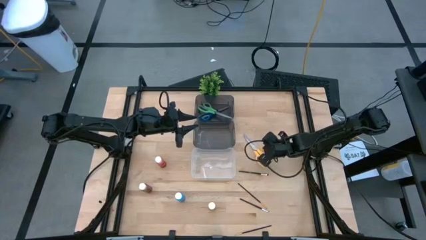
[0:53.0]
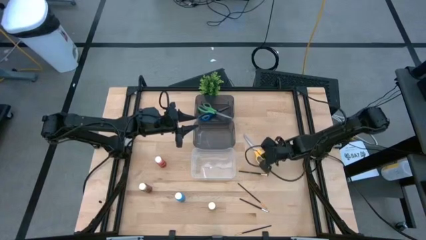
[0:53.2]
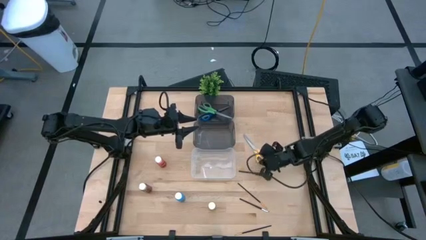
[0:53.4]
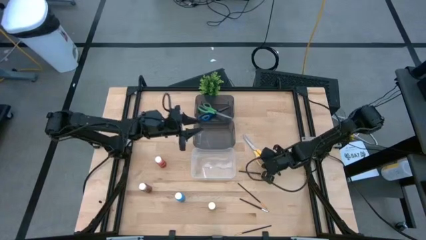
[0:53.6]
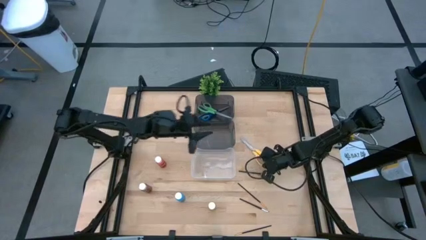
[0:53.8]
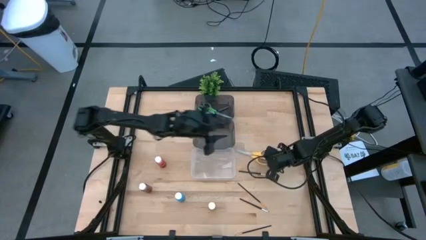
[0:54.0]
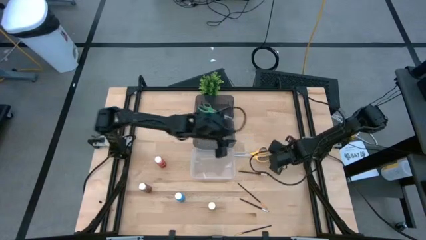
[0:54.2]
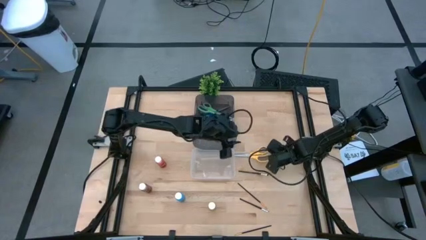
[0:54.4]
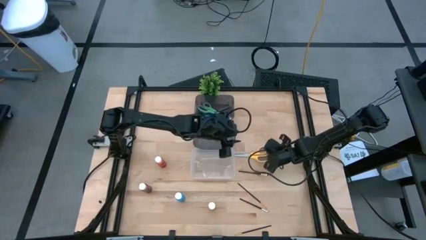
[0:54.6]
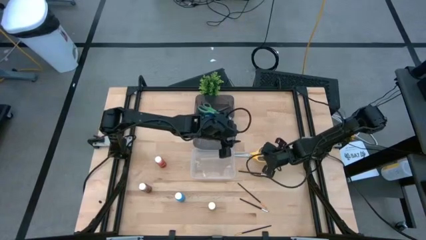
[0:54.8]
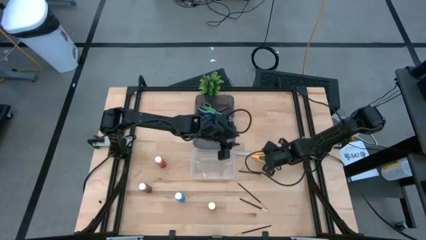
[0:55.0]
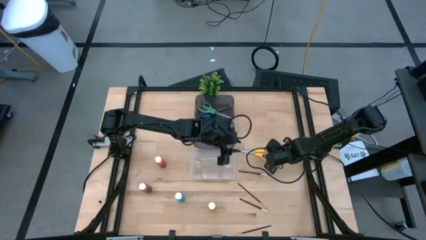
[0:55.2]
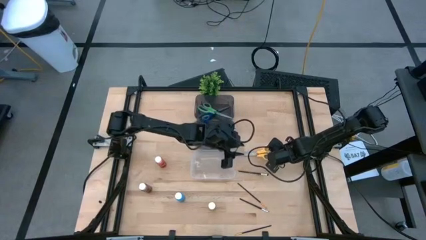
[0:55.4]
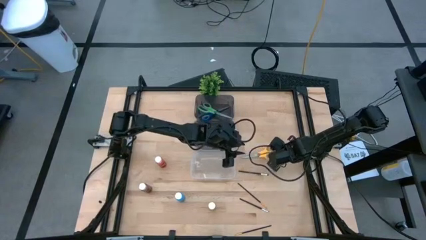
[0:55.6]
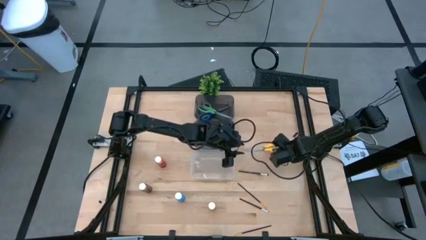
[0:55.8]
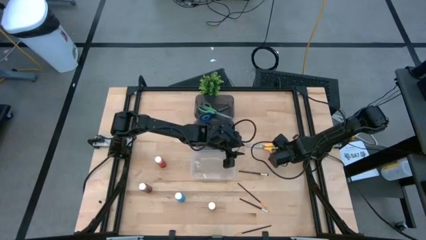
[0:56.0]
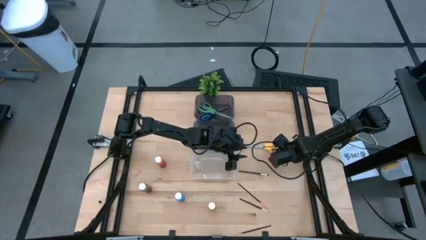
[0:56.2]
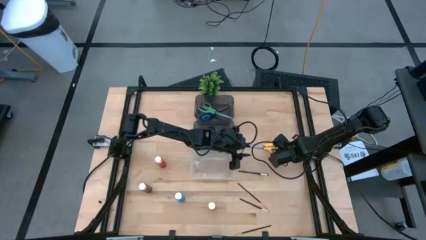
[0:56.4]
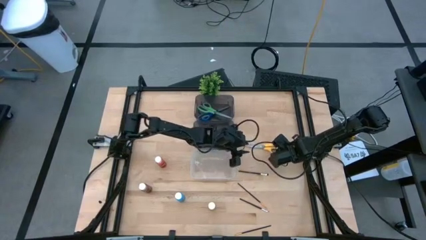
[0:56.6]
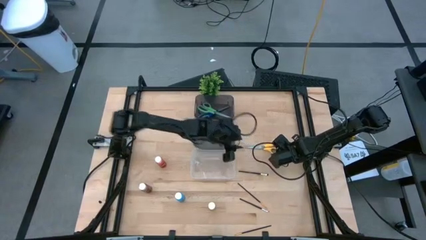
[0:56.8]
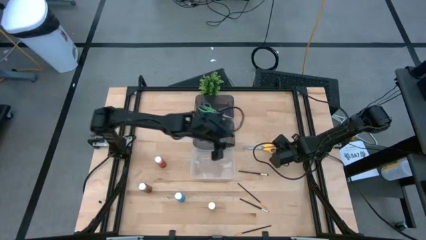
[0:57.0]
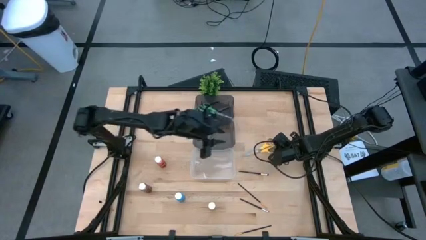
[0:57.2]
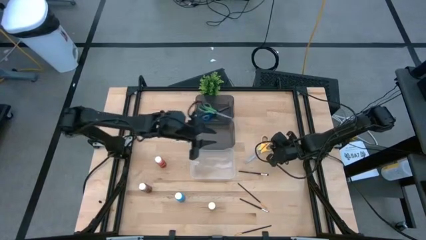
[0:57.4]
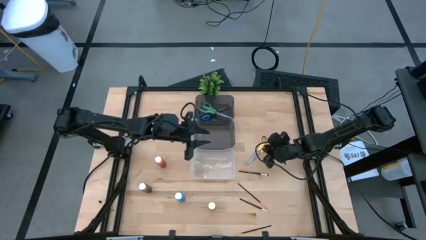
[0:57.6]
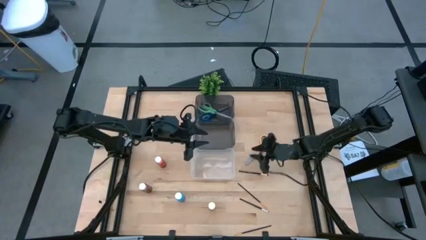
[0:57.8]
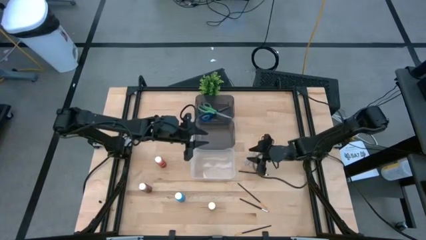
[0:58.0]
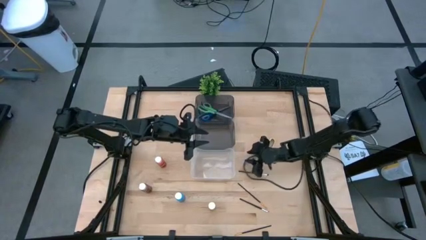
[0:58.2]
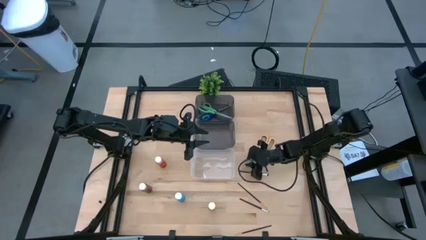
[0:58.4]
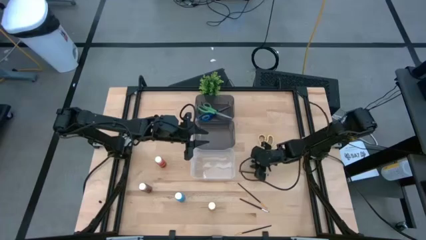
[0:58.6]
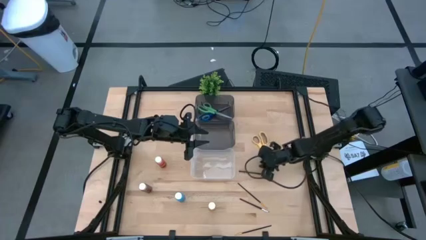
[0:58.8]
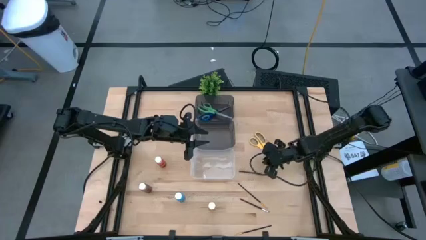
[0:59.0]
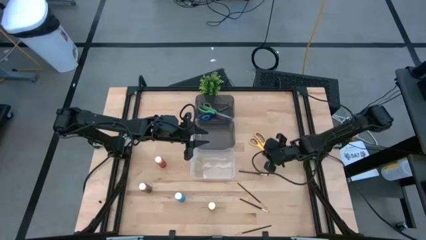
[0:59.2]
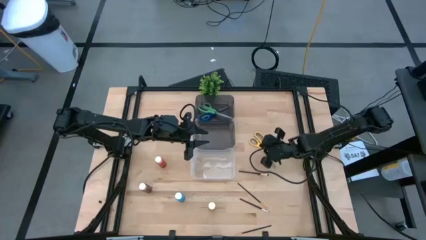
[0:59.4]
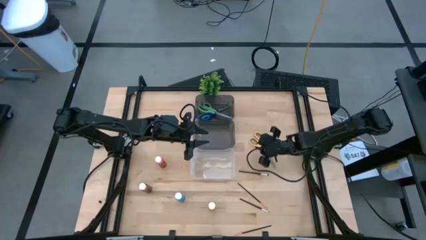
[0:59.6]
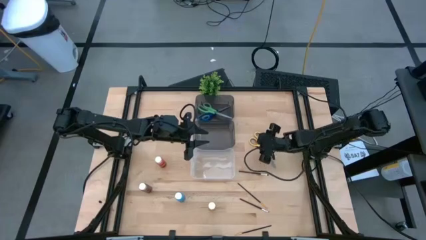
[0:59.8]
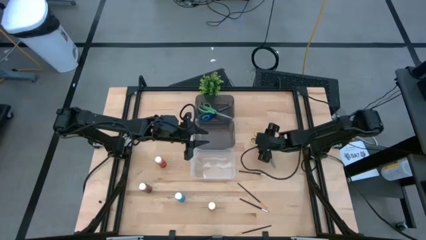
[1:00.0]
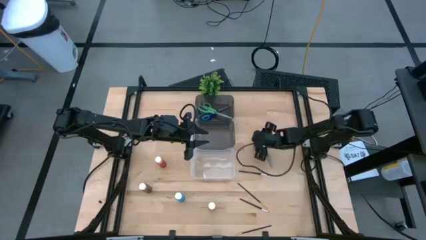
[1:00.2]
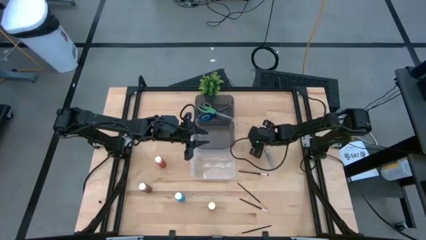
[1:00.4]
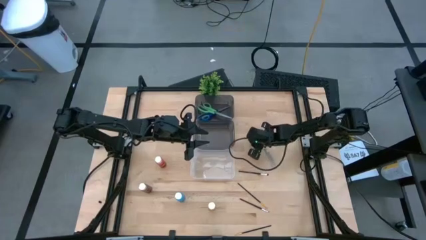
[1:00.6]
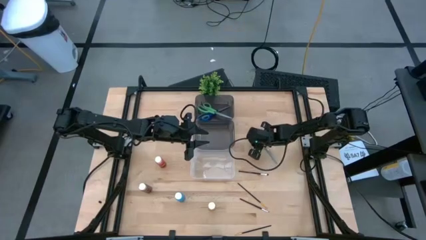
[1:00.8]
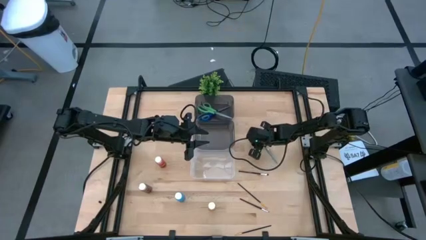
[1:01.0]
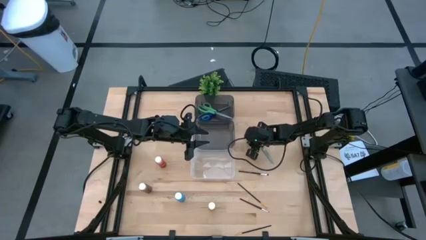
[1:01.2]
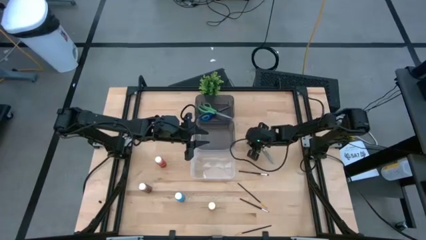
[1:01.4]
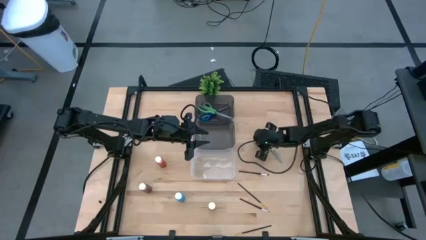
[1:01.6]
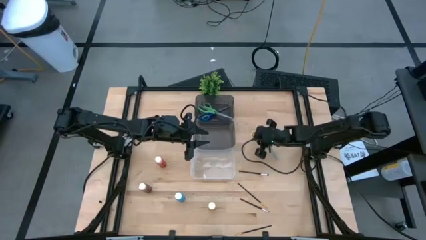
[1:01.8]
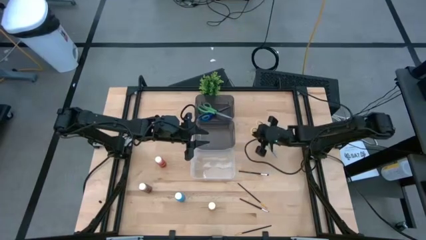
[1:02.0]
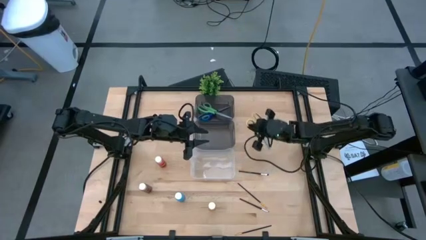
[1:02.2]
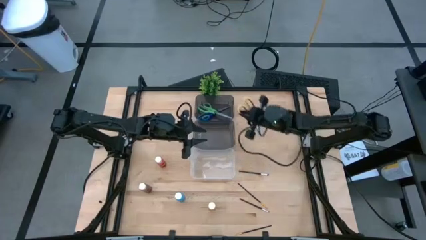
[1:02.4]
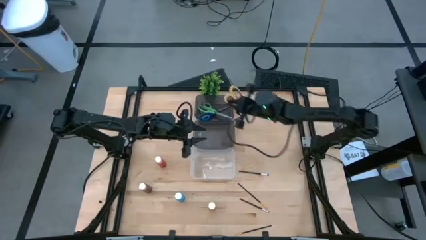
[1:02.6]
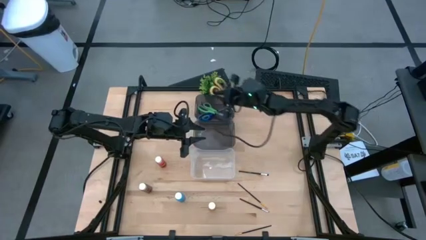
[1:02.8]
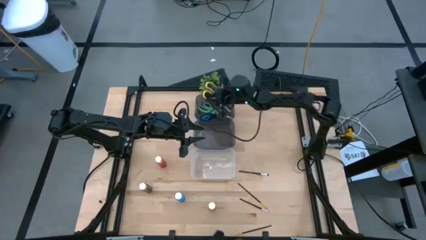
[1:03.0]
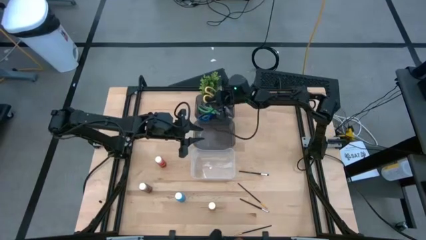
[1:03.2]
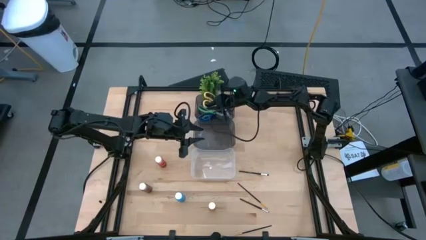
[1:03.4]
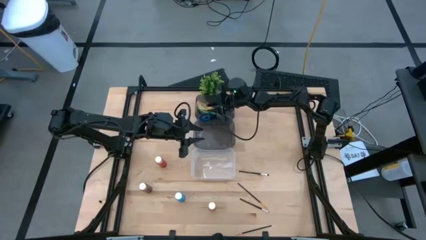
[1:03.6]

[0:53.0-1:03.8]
Task: Pick & Place Paint Supplies
Put the yellow scissors into the top black bin

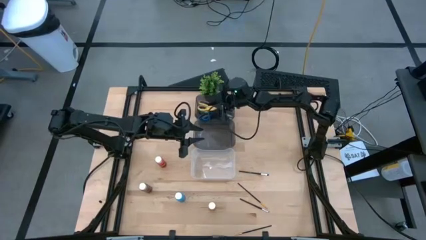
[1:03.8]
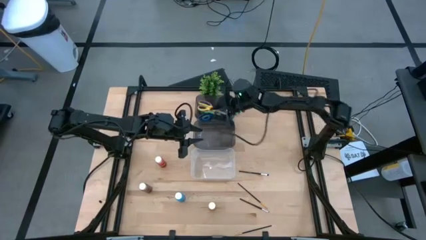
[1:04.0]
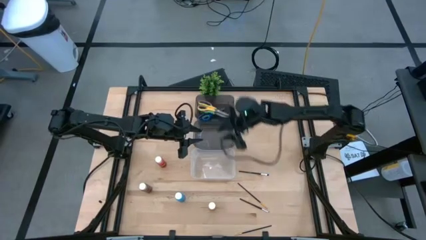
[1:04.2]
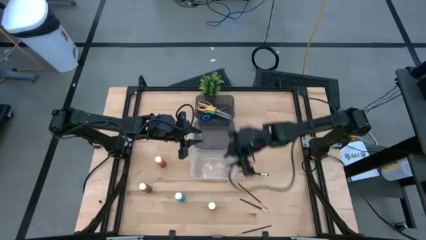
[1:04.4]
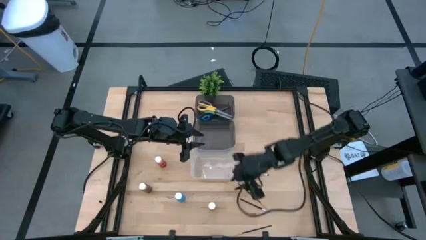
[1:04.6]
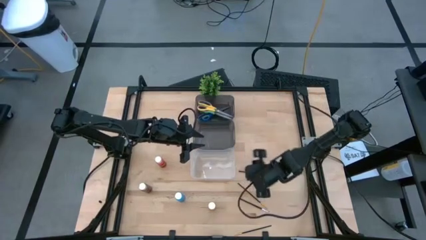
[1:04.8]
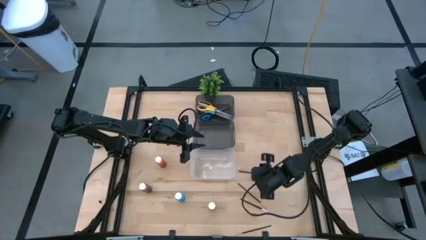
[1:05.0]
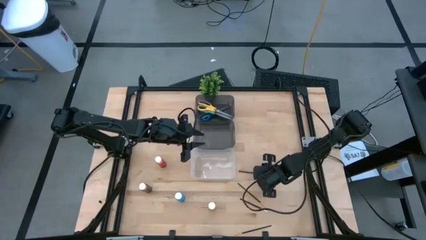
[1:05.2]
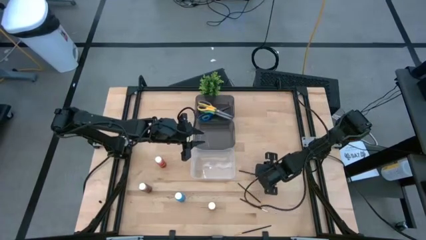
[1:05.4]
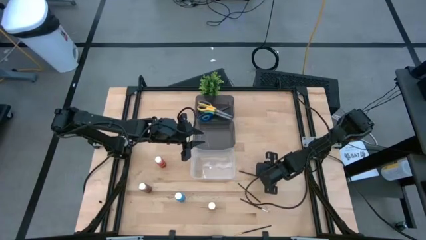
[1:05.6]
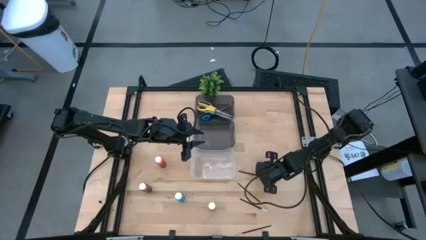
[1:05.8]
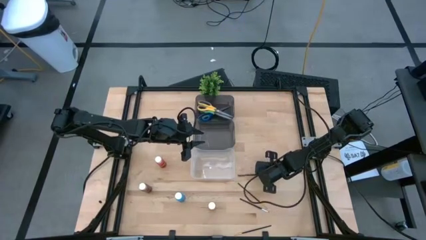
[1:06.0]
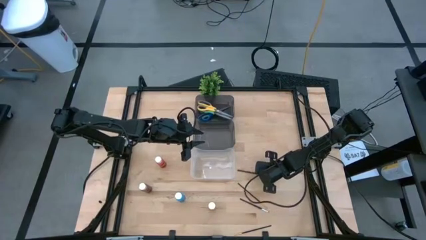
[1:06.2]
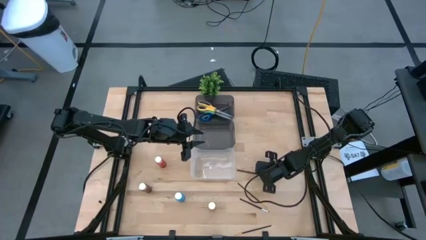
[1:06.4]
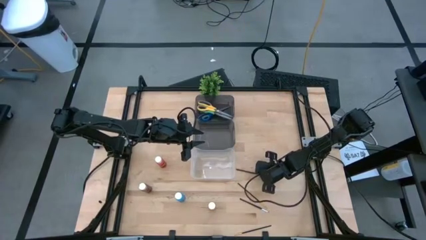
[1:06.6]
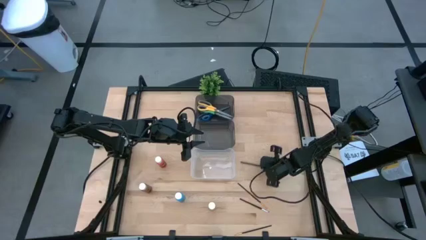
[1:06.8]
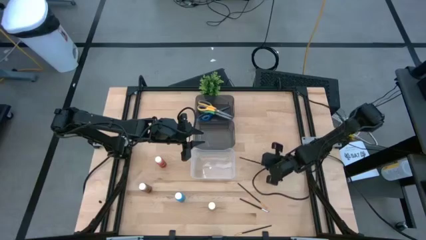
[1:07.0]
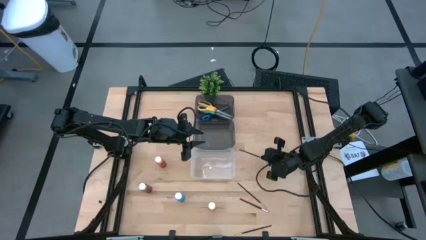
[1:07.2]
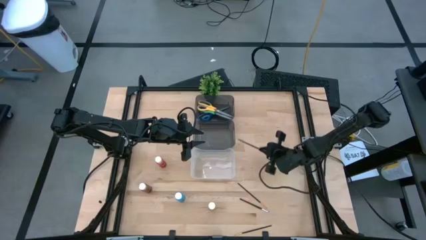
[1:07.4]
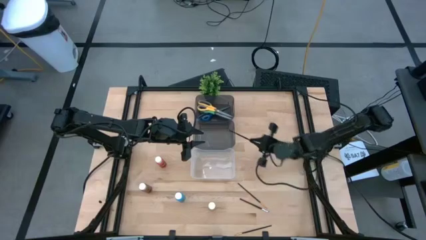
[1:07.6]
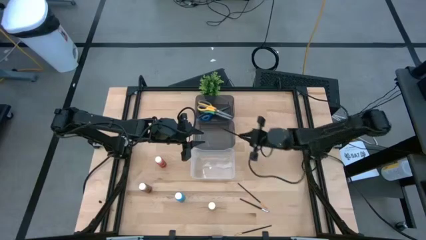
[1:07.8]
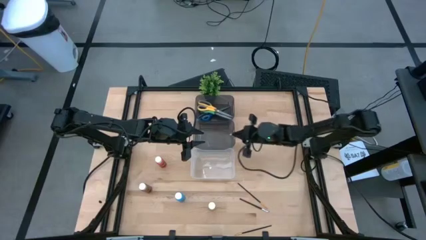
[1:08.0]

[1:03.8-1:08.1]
Put the silver paintbrush into the bottom black bin
